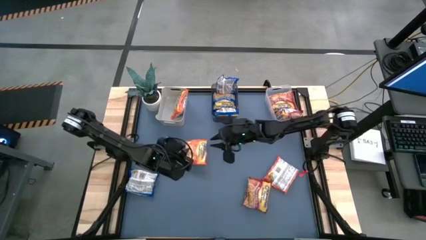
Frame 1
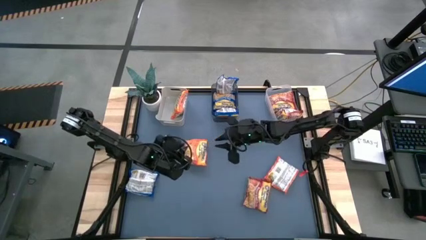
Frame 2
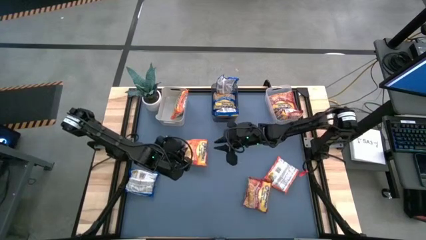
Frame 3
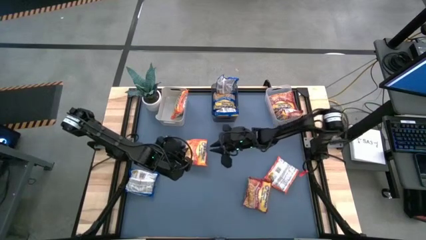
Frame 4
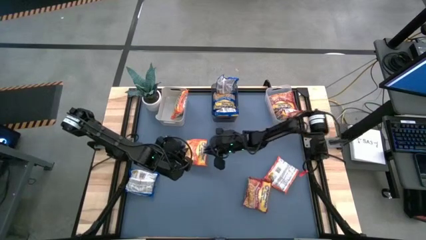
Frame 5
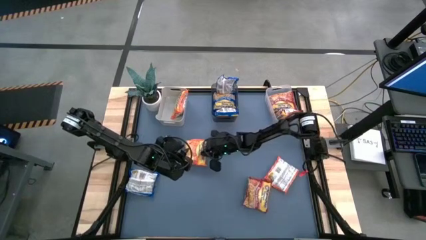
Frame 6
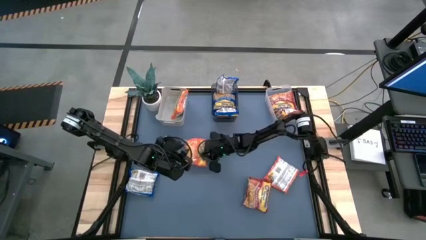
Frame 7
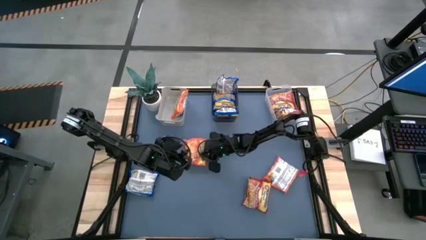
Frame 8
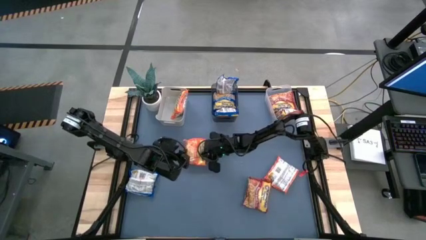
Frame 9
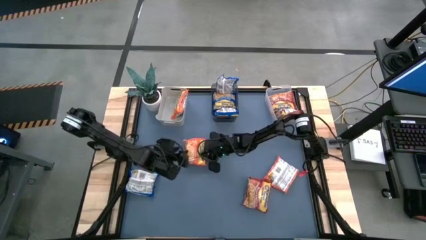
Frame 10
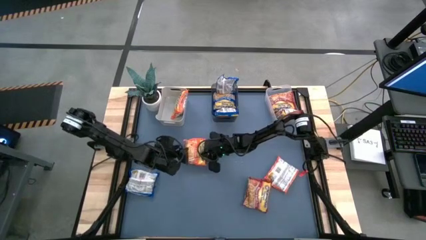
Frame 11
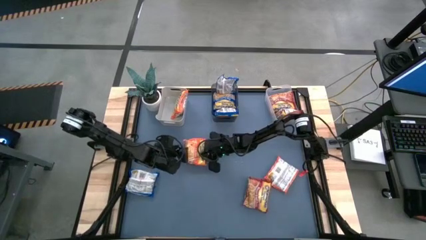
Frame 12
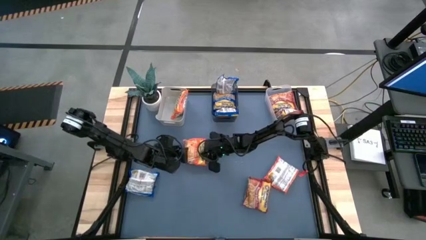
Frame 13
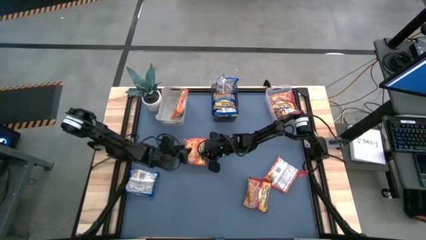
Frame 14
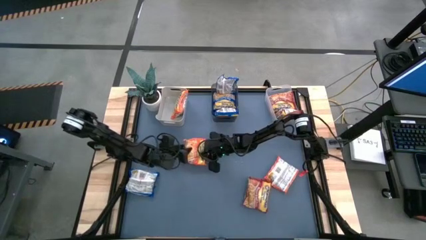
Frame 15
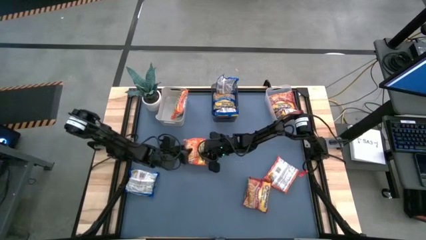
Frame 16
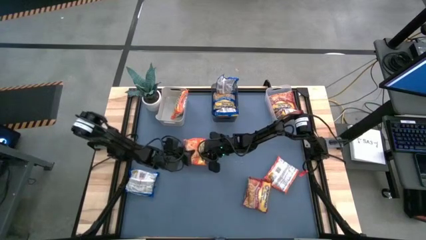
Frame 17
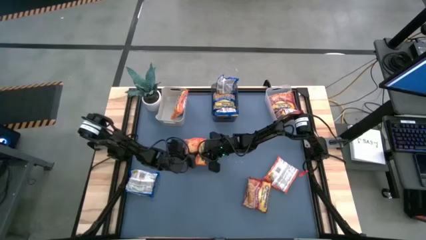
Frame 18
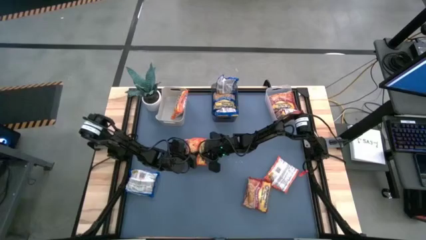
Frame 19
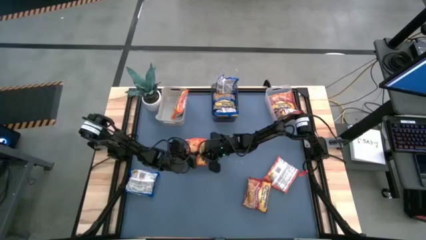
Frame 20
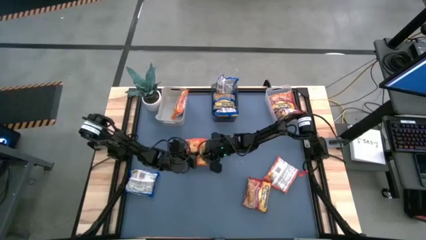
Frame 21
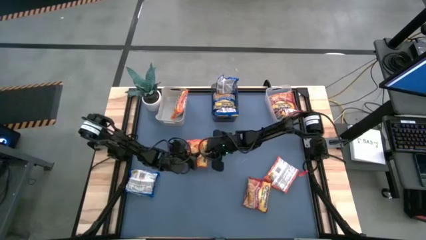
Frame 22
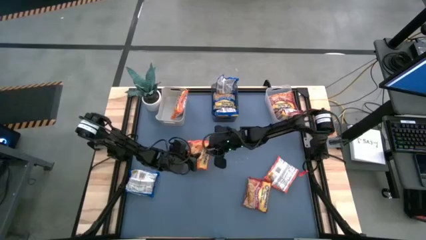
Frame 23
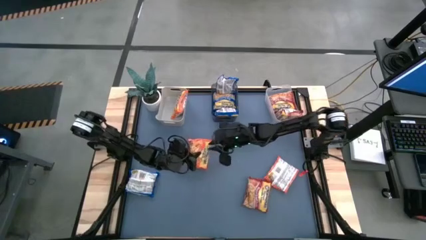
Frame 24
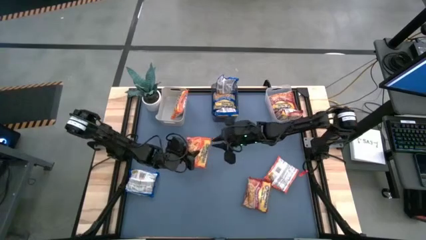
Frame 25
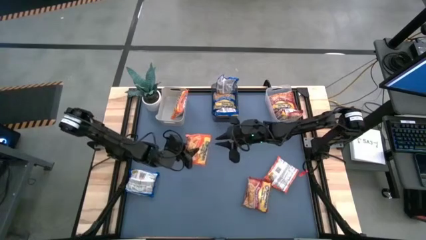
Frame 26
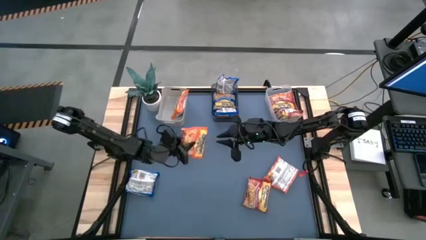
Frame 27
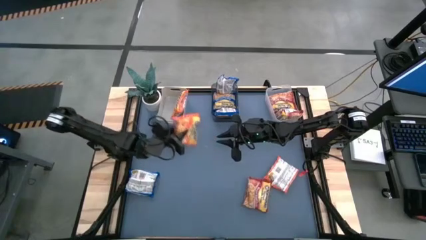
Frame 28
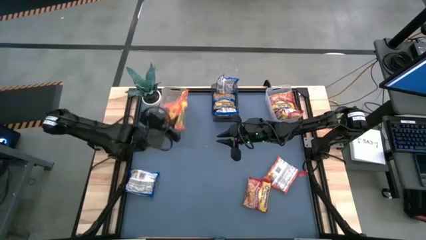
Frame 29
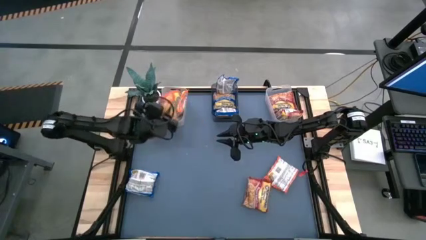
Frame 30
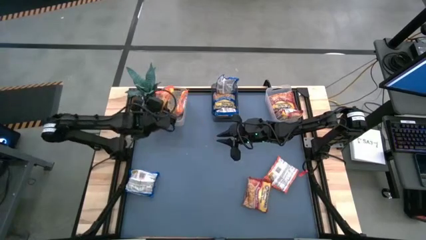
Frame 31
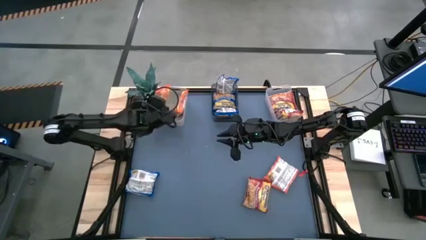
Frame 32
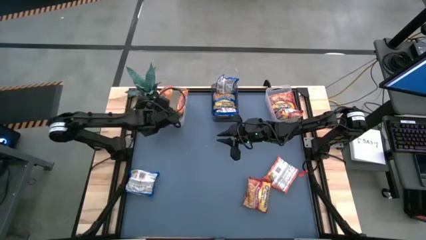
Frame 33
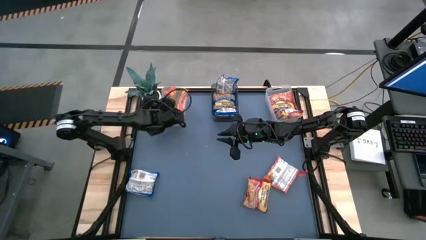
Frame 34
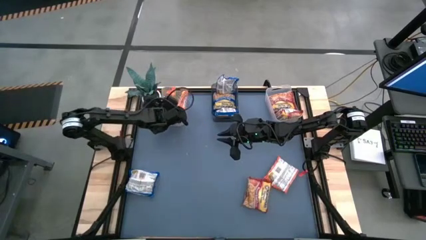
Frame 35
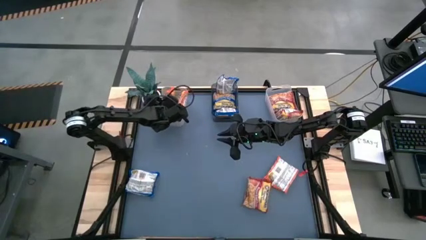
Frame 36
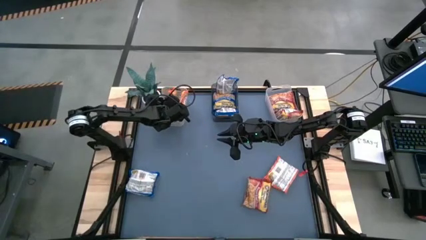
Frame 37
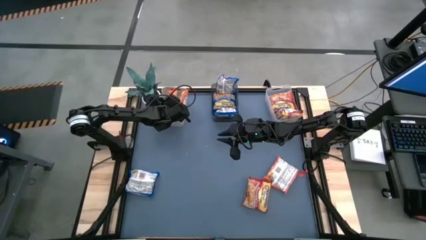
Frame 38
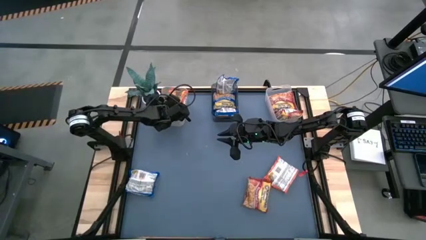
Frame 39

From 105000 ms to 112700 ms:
Task: Sort Maruchan noodles
Put the orange noodle pack into the gray bin

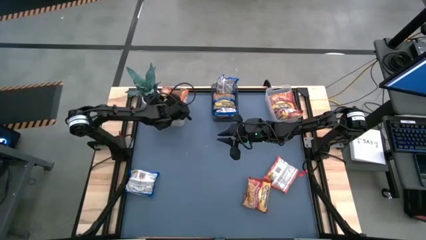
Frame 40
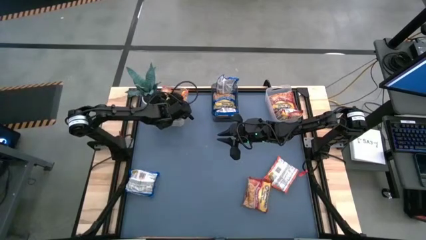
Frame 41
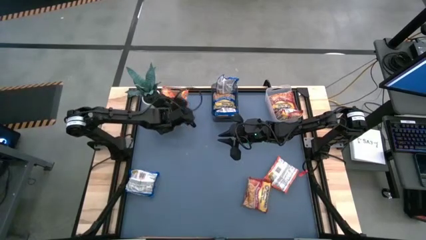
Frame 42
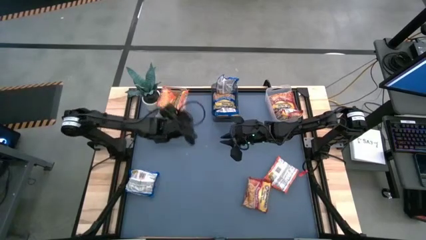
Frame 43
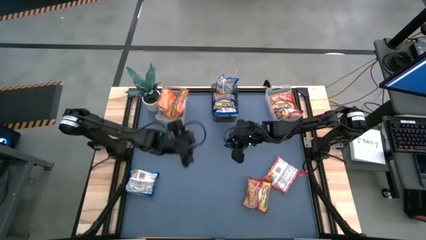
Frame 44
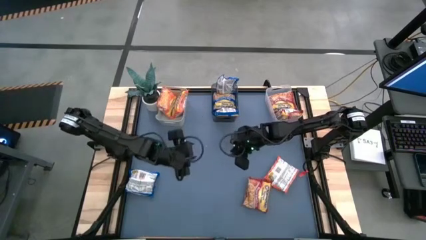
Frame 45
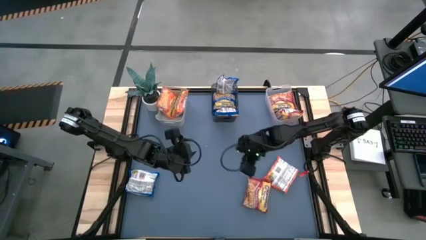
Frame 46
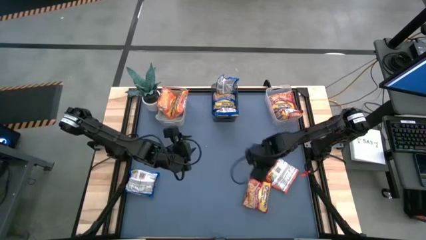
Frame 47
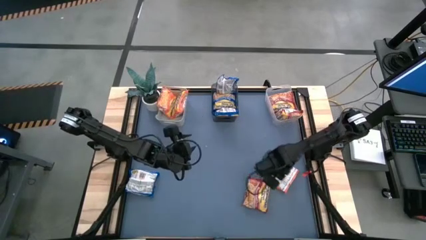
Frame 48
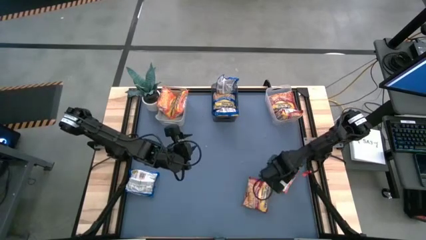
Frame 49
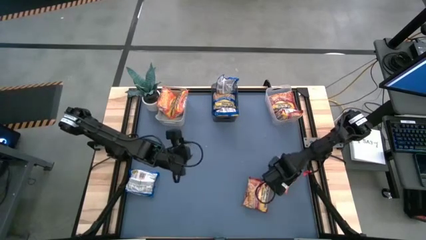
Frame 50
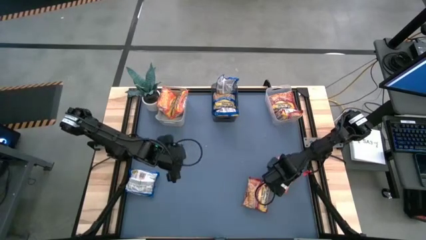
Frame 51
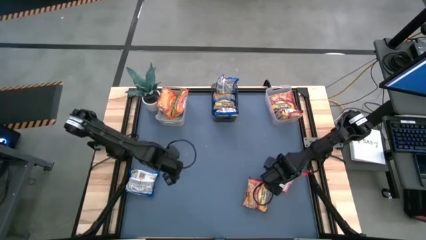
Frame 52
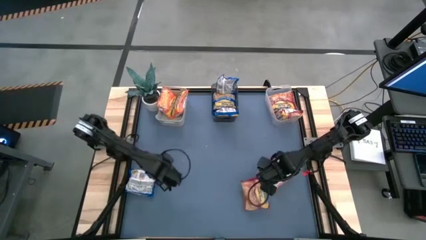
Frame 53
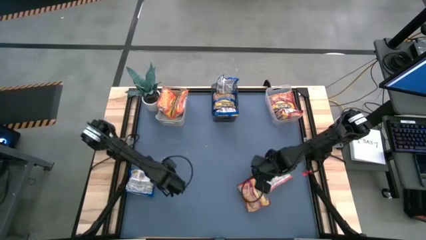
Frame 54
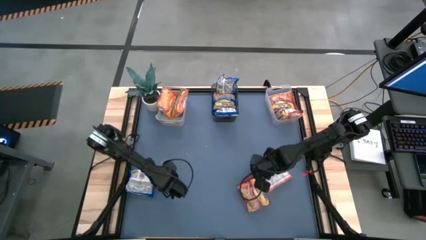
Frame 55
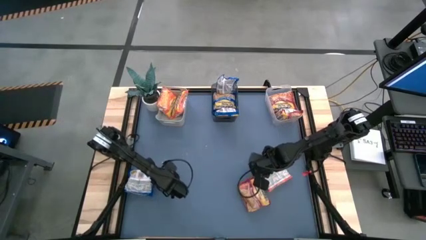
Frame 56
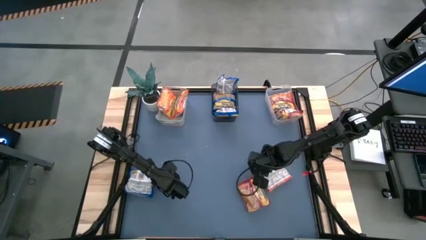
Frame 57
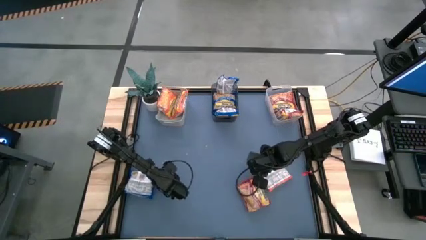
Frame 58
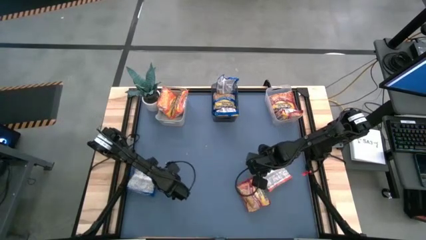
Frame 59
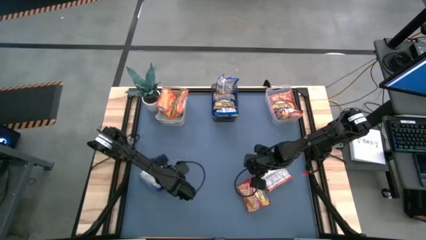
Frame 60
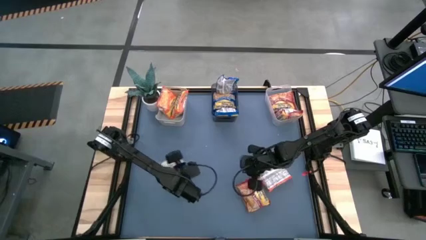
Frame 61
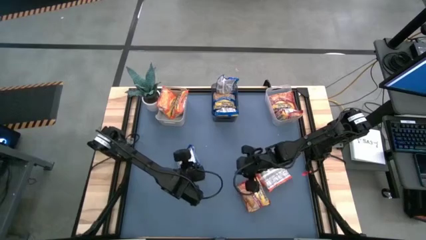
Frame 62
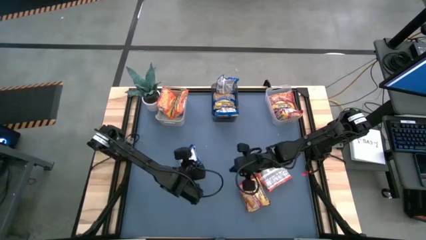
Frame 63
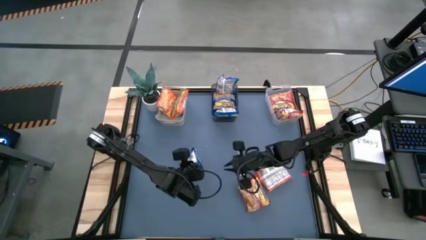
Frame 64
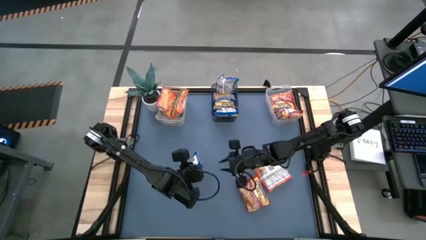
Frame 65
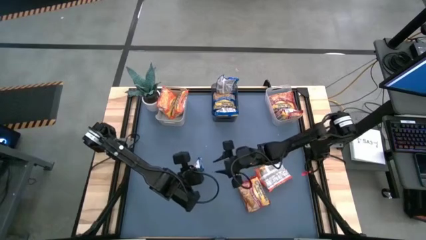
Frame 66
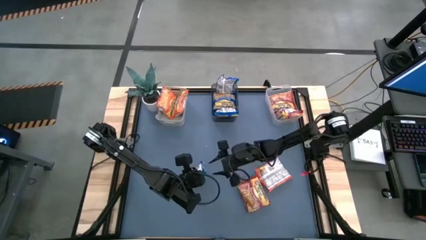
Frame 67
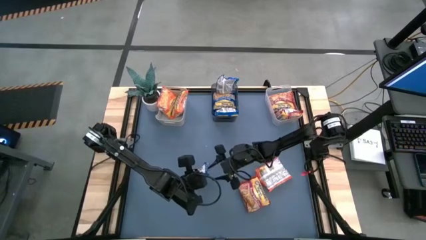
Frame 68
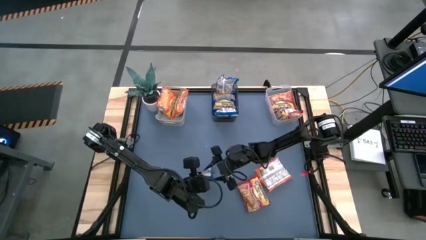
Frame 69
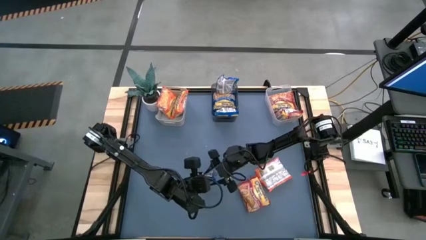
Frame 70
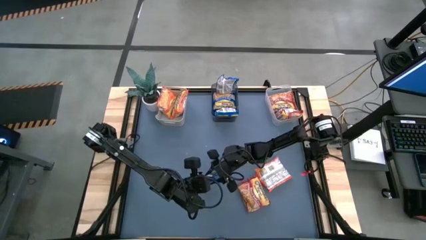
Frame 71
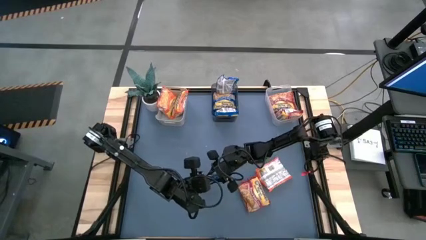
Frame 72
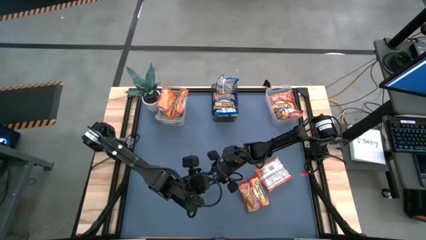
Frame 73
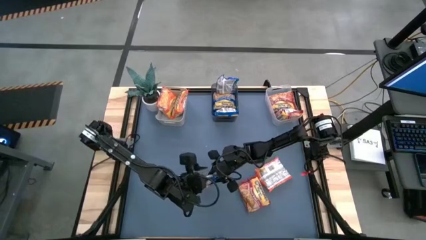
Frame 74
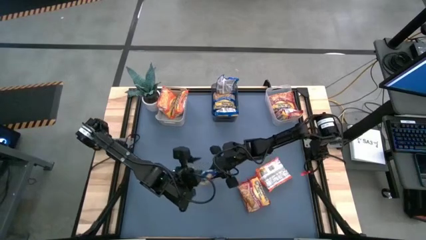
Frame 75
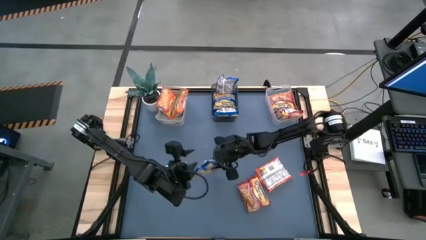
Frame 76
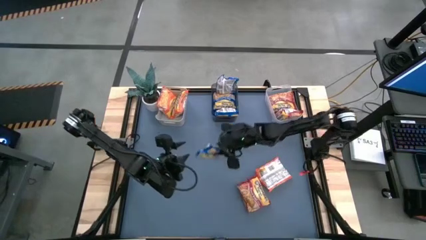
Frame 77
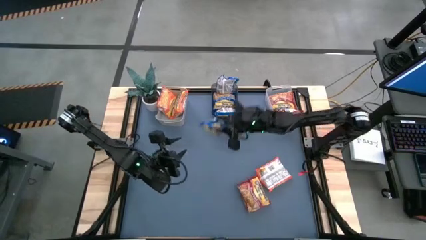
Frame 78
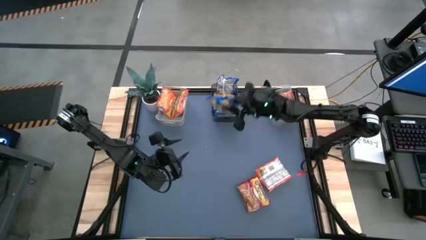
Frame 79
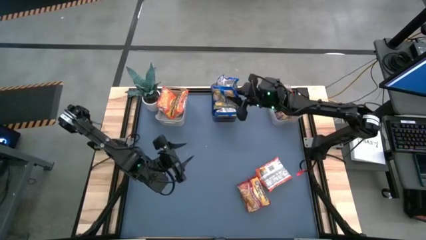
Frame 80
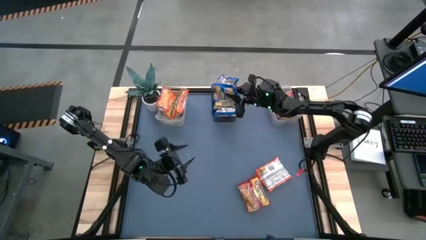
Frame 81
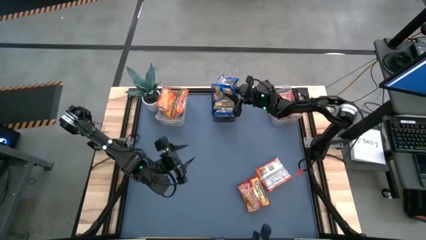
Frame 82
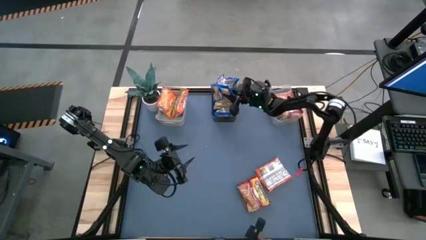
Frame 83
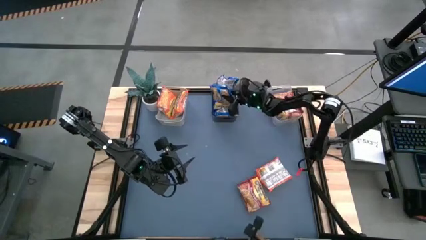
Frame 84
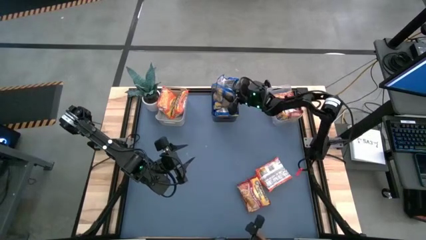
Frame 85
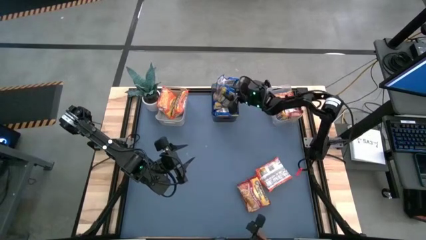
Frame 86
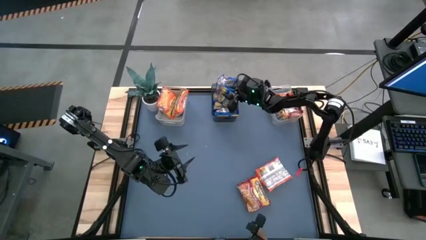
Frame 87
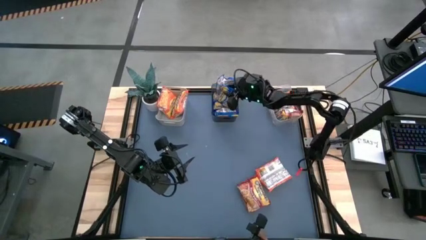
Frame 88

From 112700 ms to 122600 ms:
Put the blue noodle pack into the black bin
